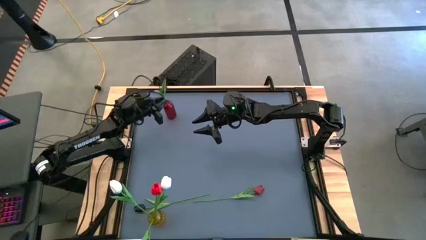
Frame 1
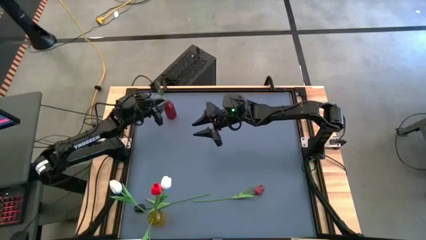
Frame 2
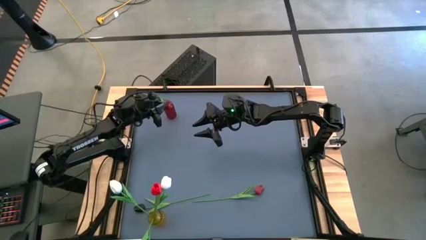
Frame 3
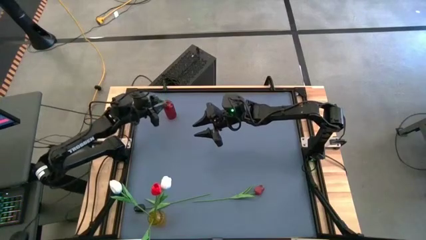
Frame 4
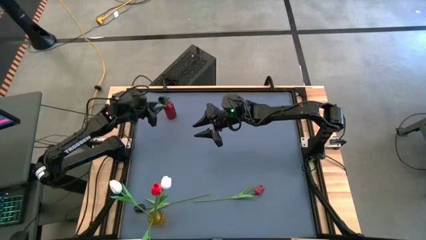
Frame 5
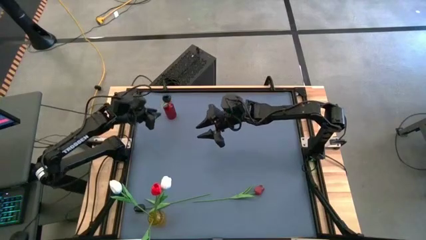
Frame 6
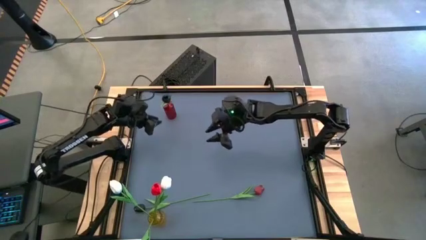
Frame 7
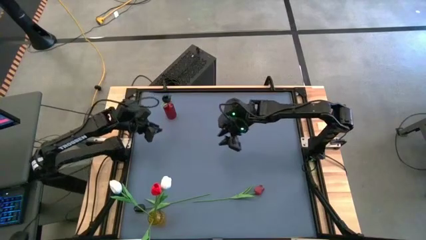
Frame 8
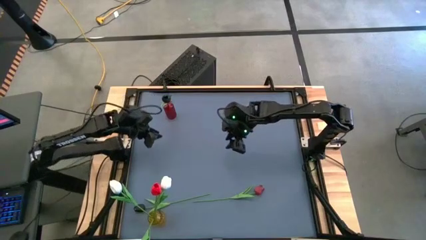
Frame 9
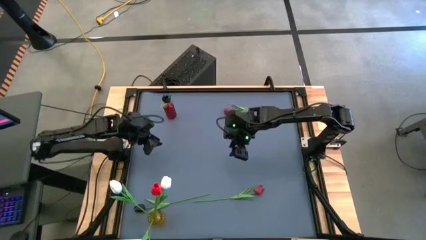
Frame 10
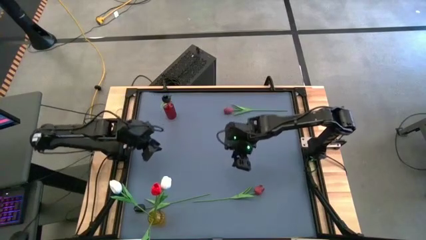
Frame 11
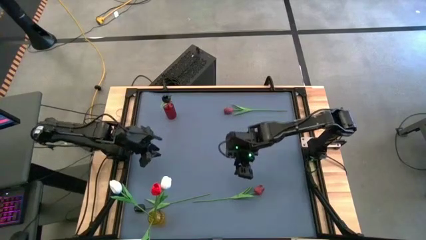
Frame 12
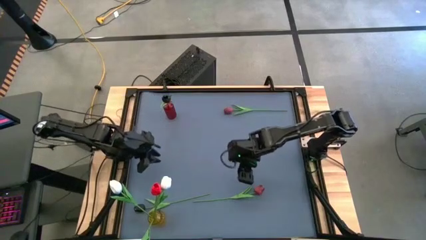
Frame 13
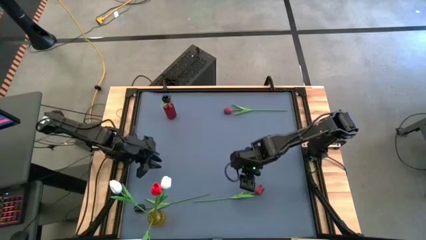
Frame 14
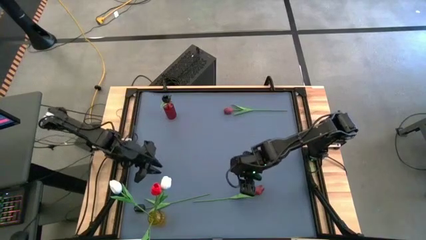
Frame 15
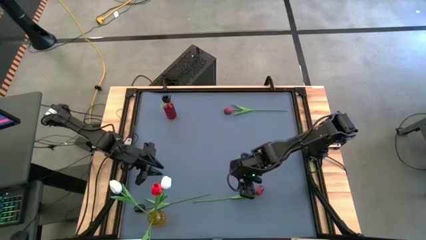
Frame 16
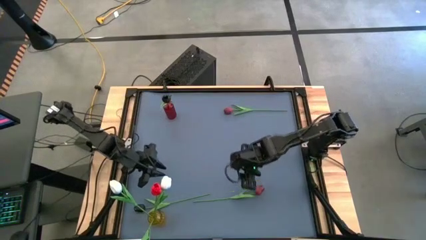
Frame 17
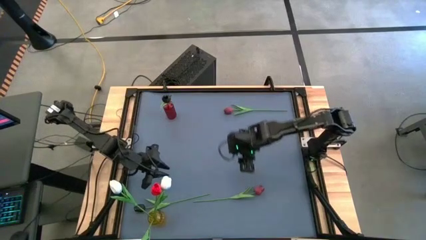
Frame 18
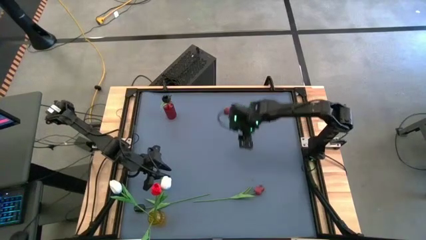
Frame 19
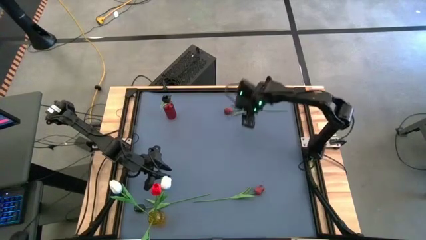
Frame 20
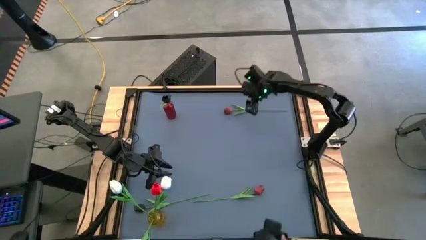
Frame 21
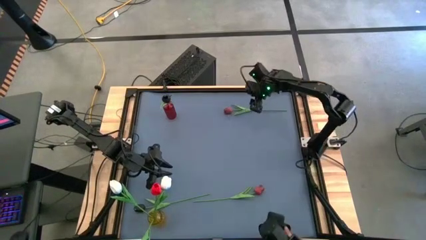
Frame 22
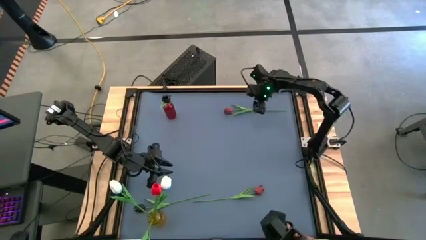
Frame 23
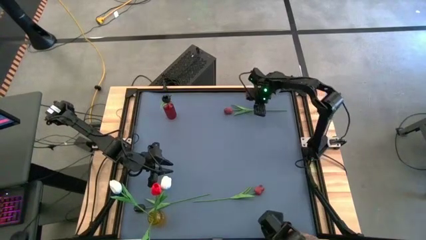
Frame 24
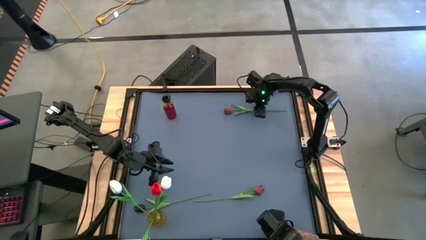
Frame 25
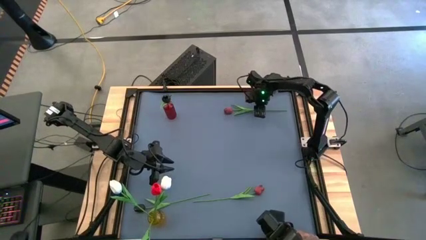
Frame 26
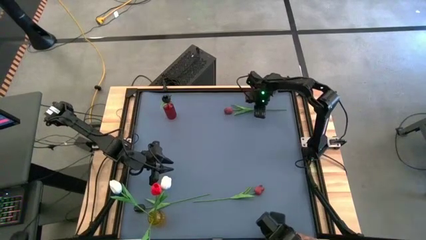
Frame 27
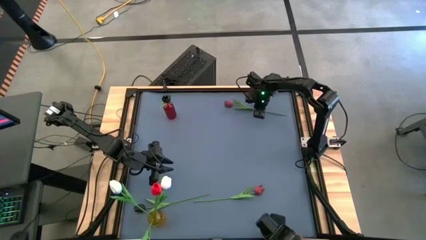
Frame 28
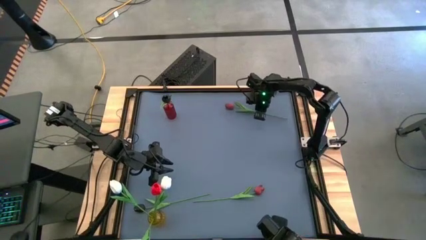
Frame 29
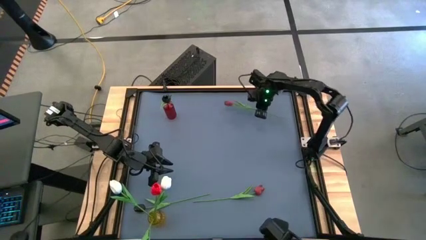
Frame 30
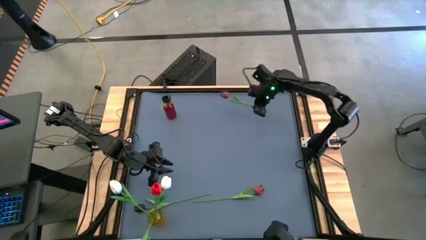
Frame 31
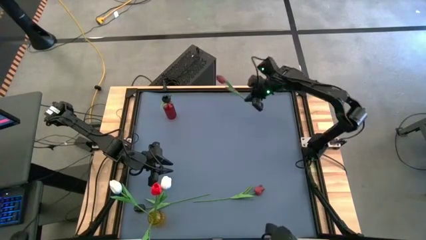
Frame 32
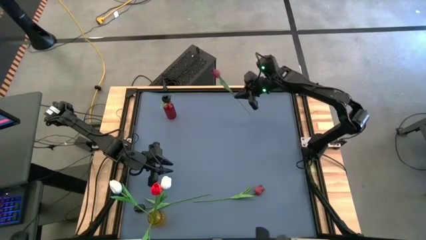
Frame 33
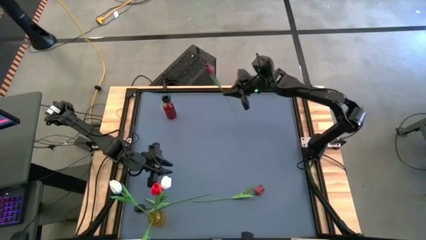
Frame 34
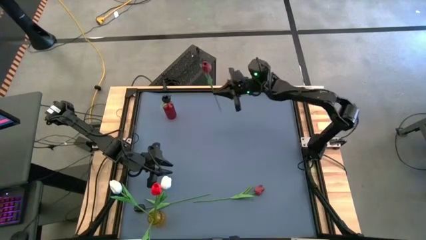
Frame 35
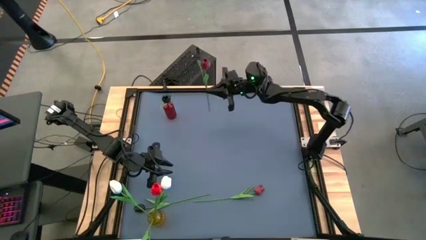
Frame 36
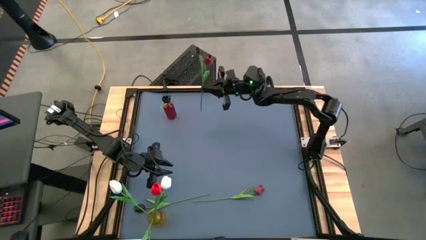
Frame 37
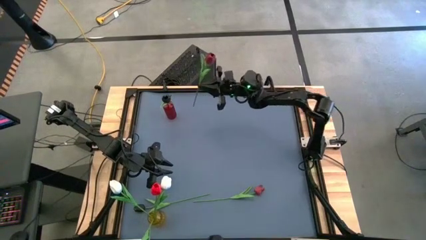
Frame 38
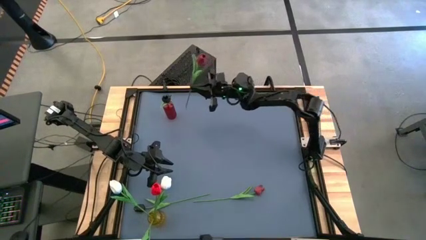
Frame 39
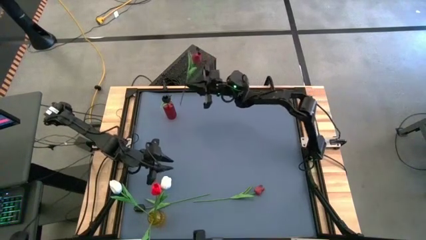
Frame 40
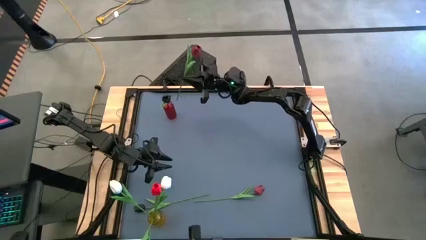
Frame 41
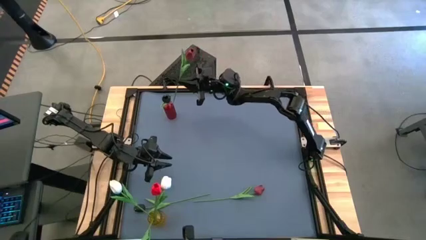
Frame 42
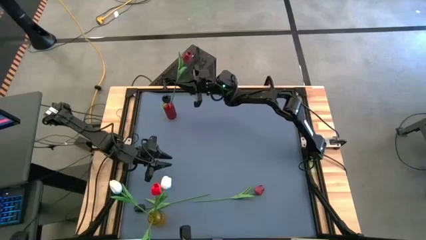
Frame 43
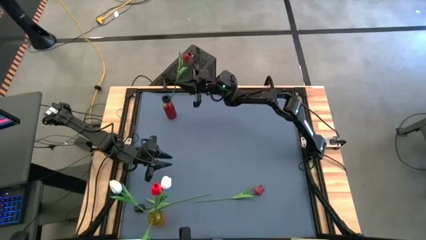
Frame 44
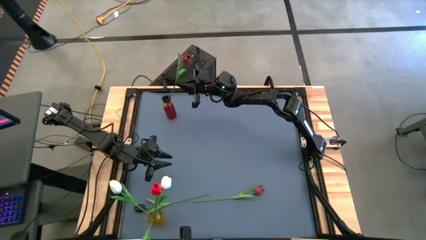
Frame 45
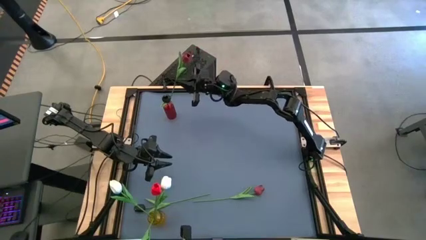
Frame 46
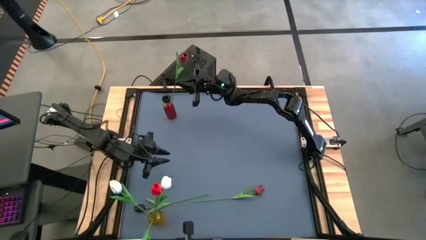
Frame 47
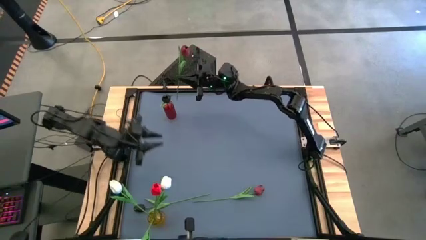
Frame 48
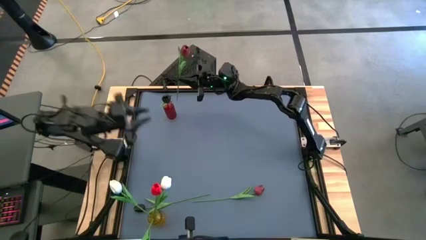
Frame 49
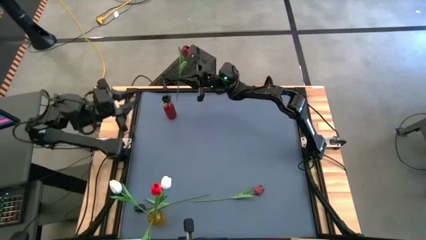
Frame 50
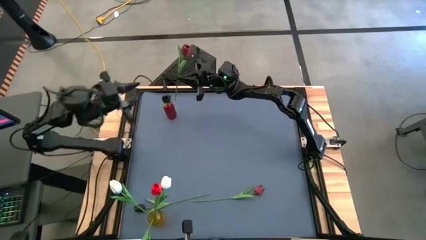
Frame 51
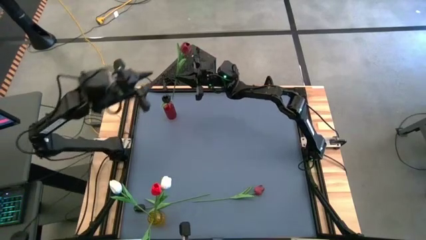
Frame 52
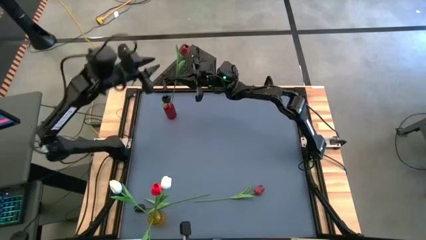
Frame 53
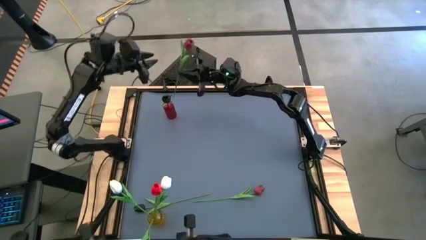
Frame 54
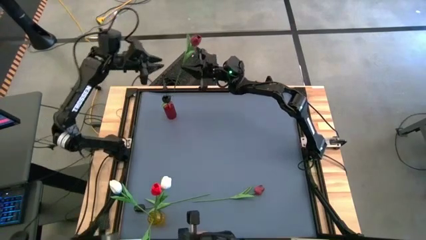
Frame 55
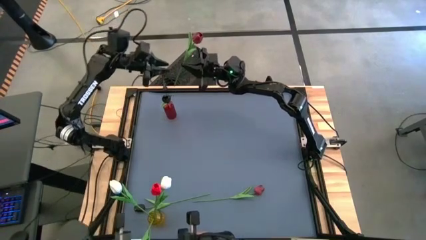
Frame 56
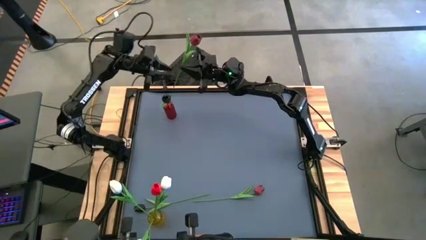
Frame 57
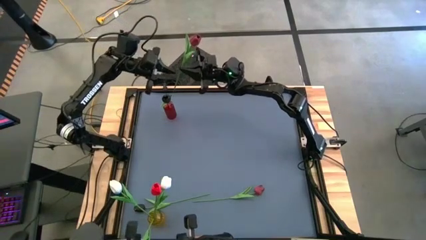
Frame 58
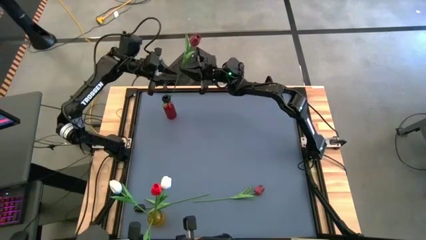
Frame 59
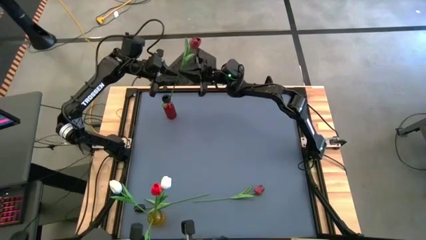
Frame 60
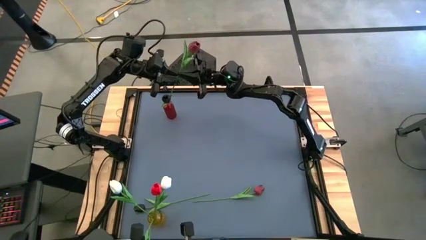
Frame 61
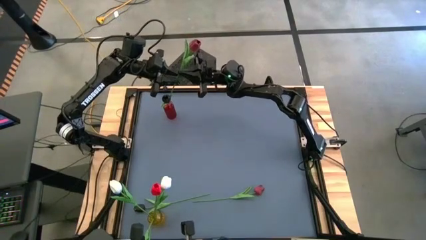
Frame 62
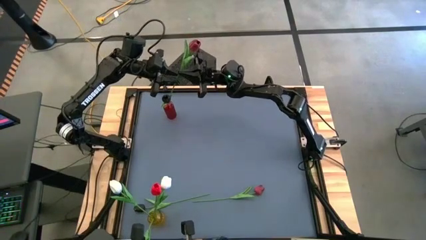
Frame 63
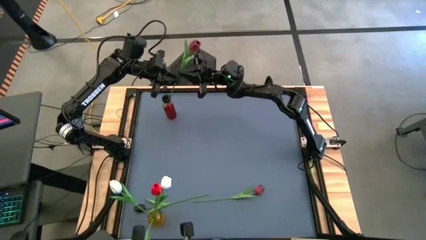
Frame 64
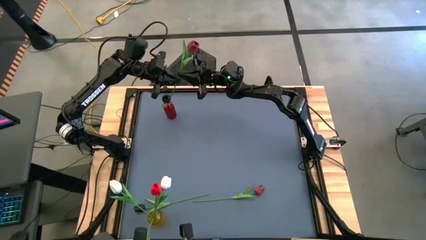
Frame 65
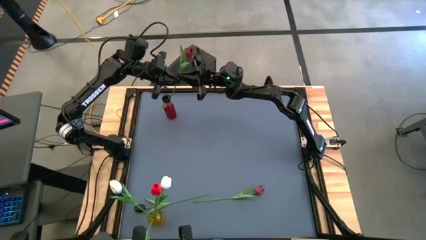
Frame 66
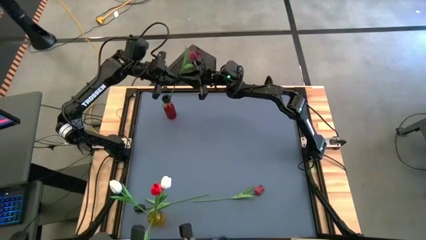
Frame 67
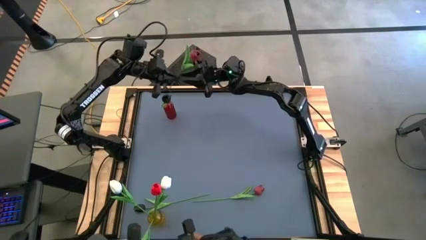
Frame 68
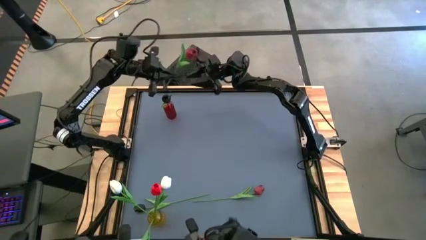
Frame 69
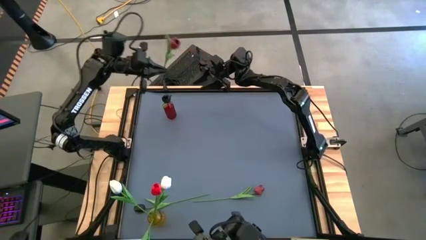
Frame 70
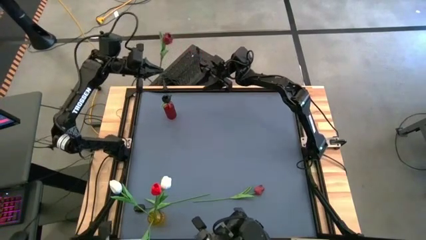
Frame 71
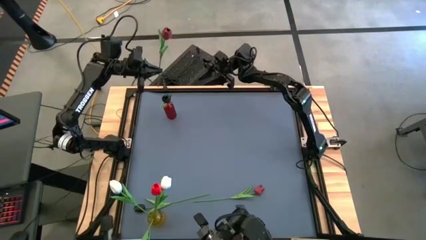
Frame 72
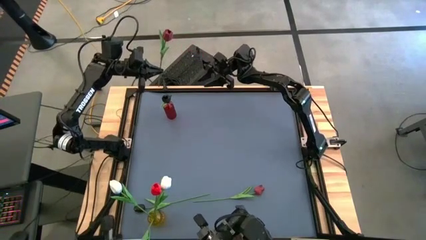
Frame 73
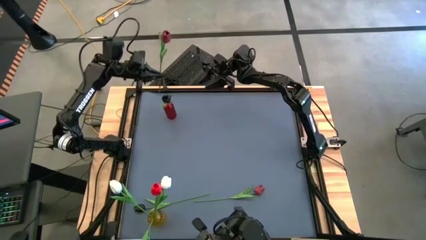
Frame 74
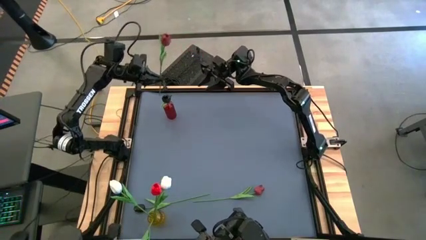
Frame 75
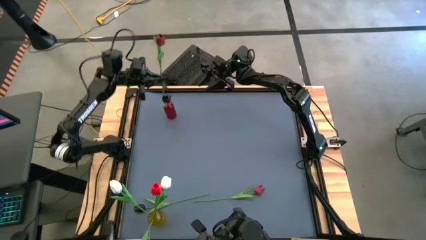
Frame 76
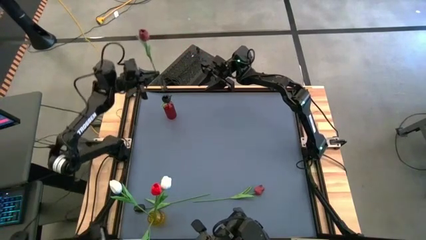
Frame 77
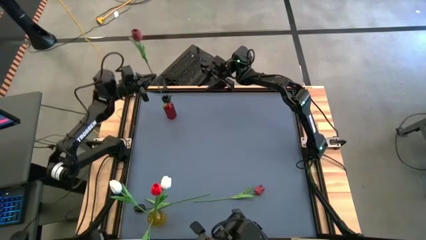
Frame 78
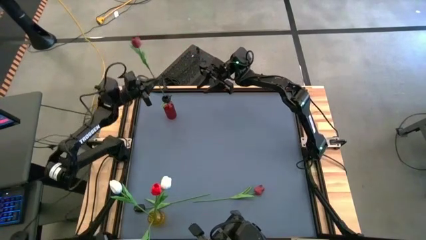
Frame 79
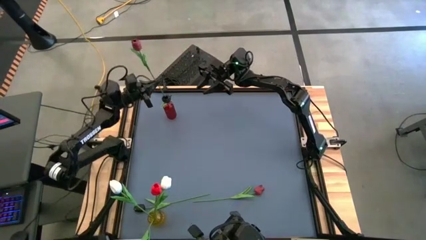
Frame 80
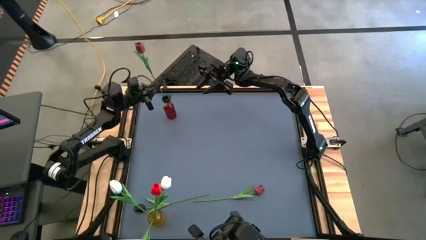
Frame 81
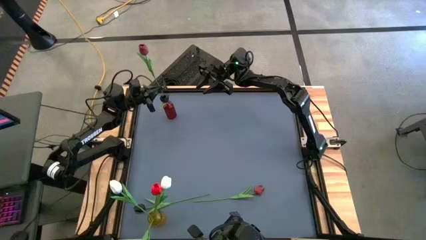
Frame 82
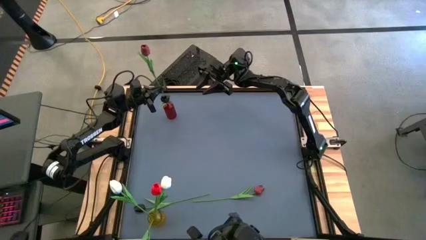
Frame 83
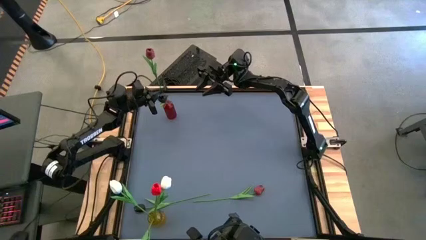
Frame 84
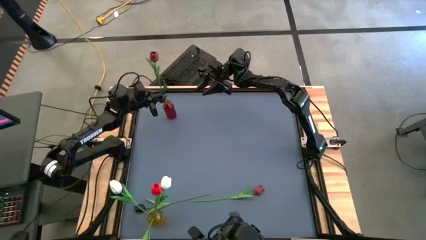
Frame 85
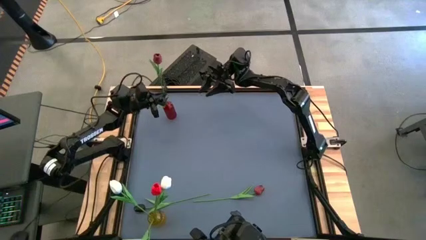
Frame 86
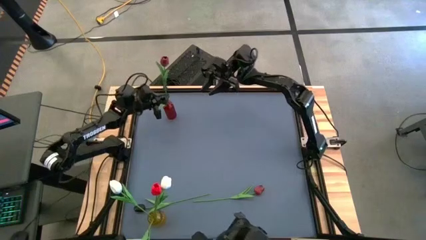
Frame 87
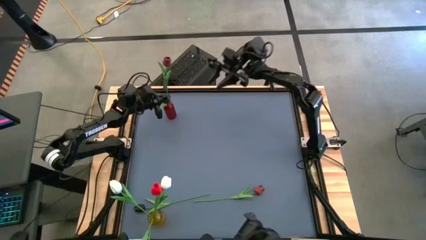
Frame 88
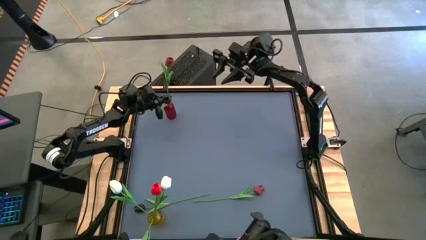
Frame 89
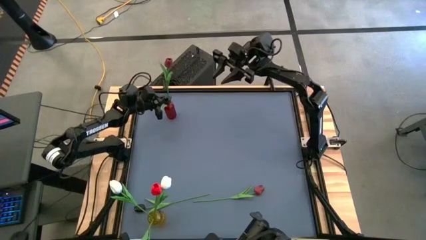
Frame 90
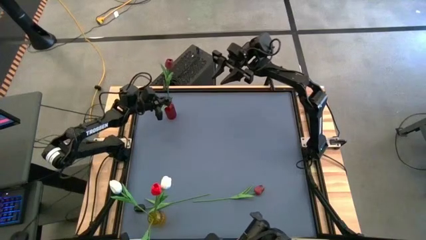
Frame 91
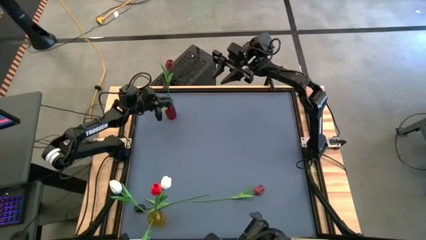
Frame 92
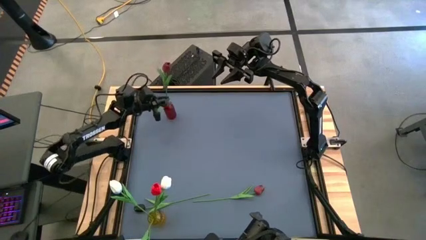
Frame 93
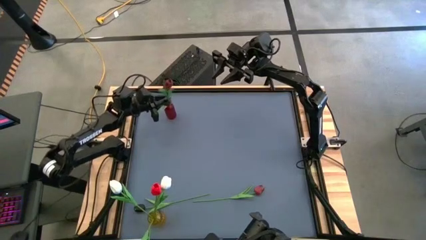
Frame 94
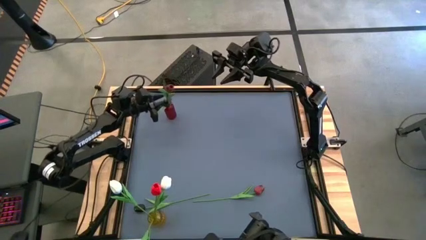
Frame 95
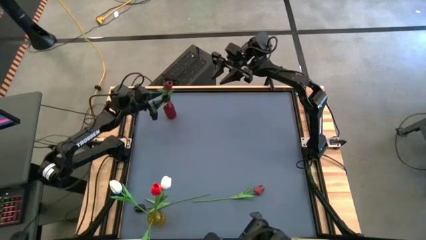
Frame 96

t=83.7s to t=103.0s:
Task: Sort flowers into vase by color
Put the top dark red tulip into the red vase
